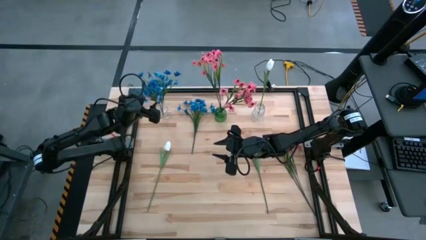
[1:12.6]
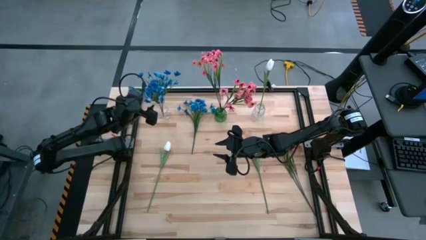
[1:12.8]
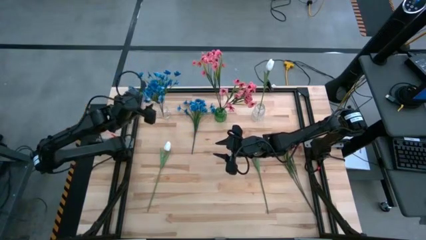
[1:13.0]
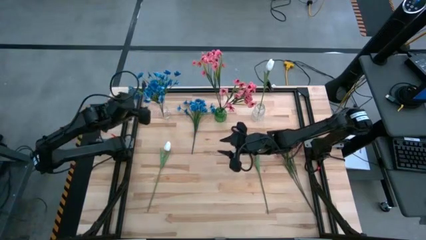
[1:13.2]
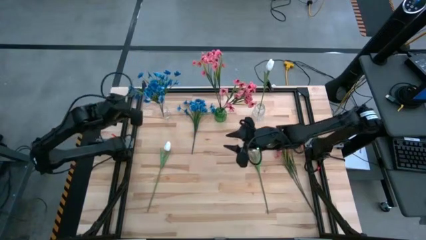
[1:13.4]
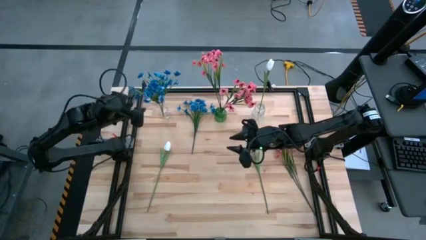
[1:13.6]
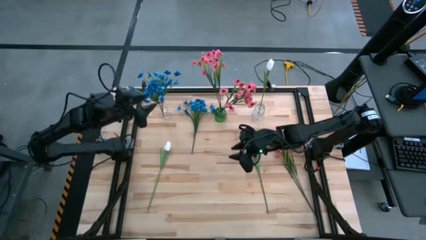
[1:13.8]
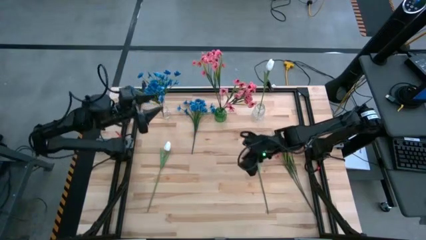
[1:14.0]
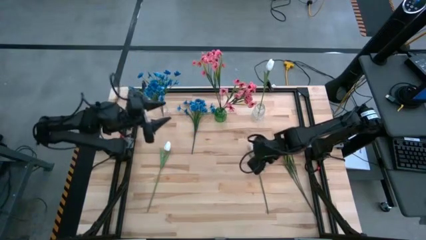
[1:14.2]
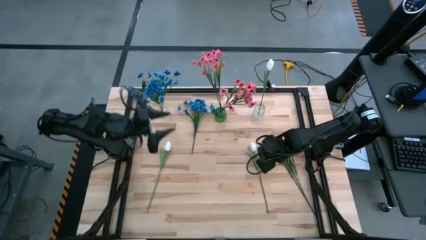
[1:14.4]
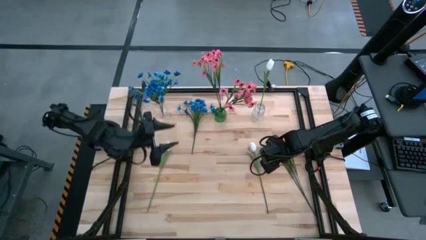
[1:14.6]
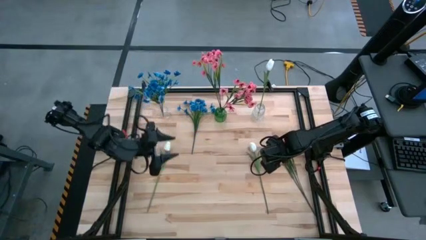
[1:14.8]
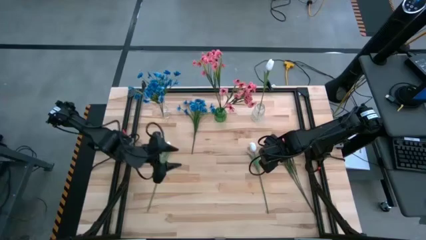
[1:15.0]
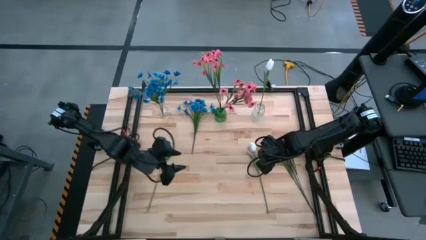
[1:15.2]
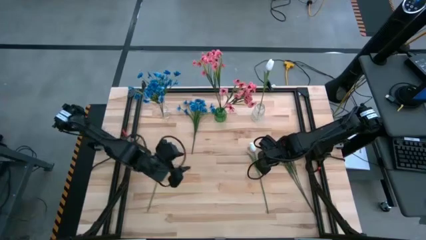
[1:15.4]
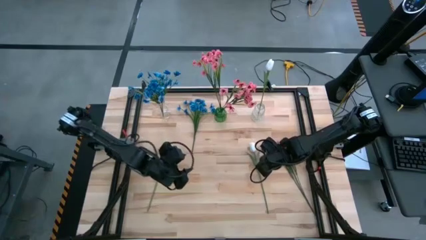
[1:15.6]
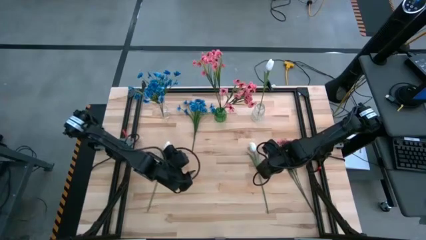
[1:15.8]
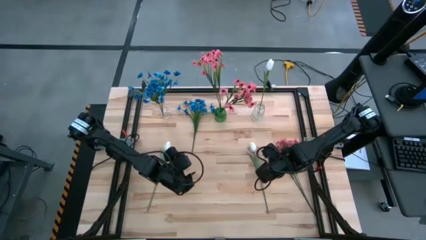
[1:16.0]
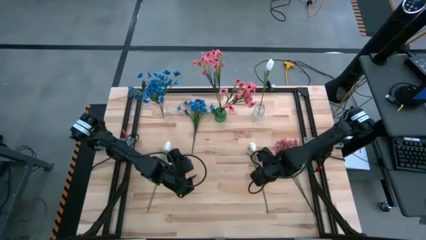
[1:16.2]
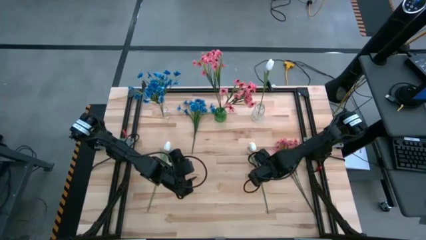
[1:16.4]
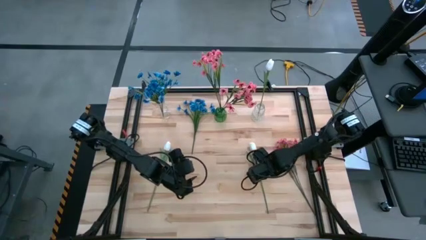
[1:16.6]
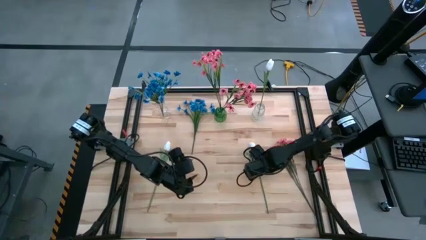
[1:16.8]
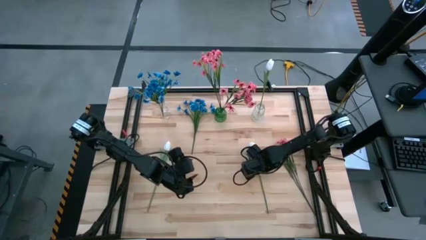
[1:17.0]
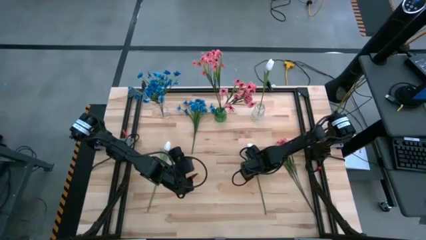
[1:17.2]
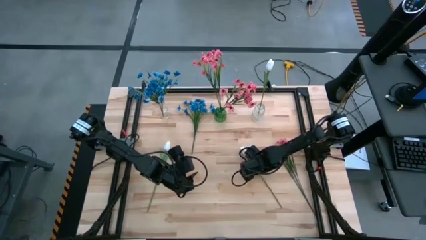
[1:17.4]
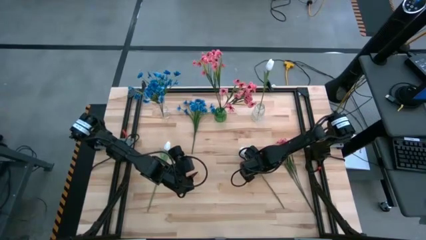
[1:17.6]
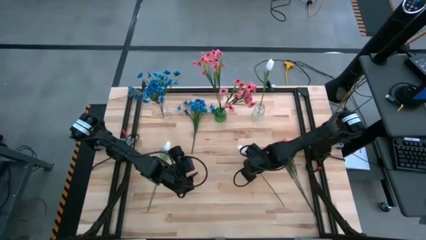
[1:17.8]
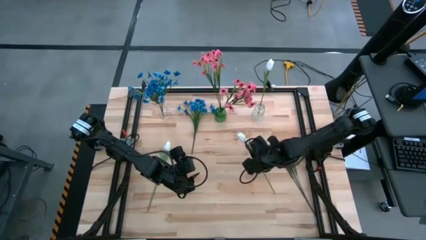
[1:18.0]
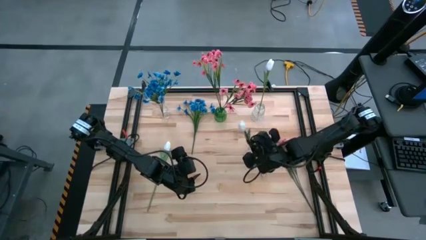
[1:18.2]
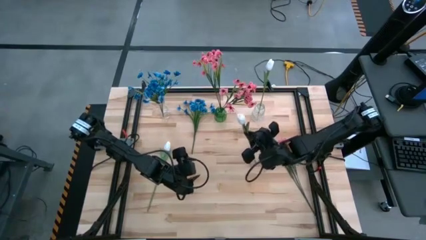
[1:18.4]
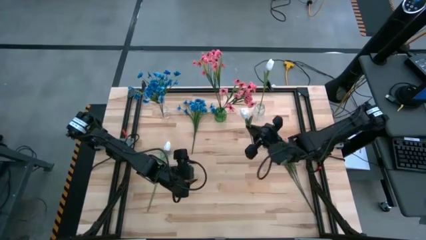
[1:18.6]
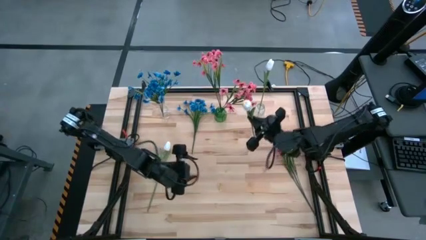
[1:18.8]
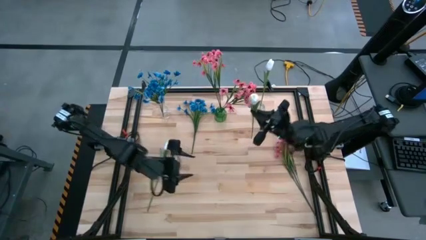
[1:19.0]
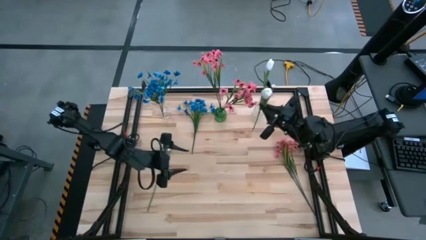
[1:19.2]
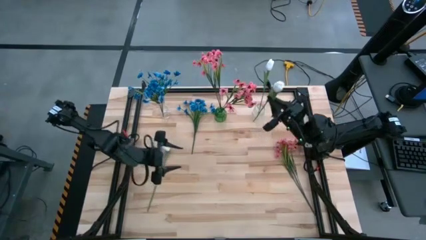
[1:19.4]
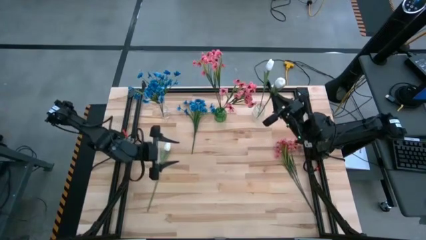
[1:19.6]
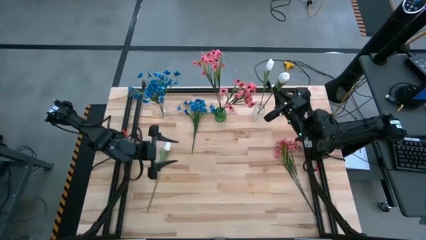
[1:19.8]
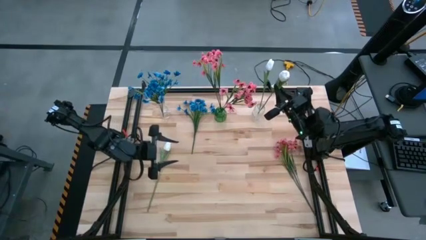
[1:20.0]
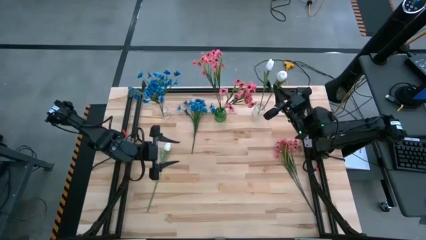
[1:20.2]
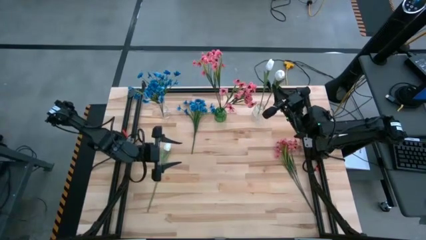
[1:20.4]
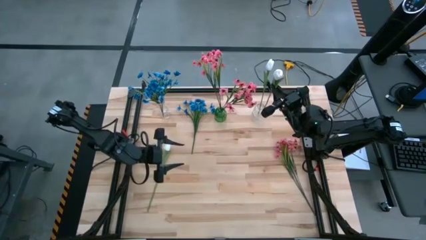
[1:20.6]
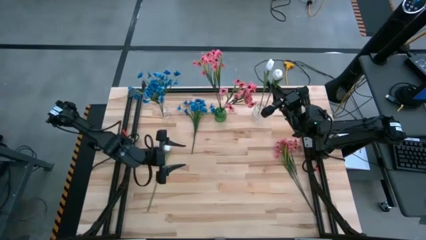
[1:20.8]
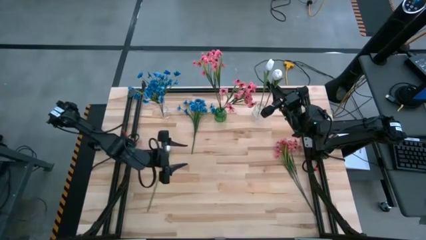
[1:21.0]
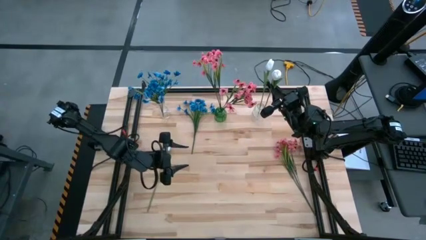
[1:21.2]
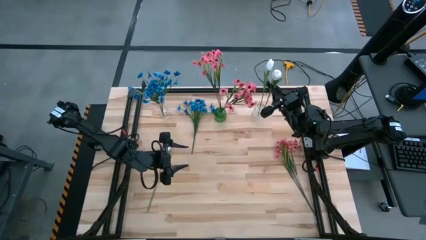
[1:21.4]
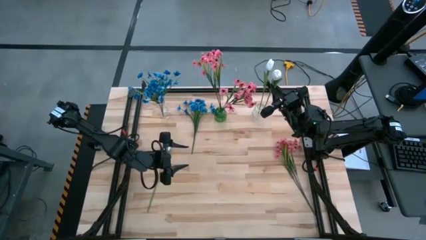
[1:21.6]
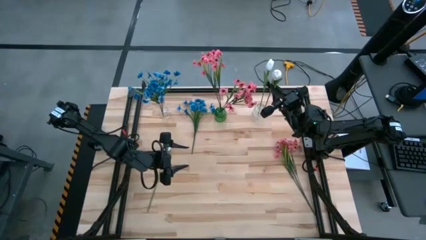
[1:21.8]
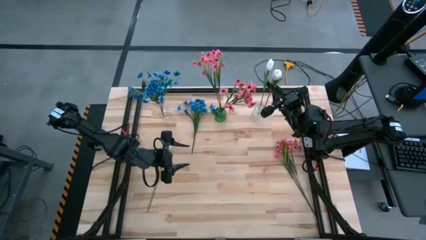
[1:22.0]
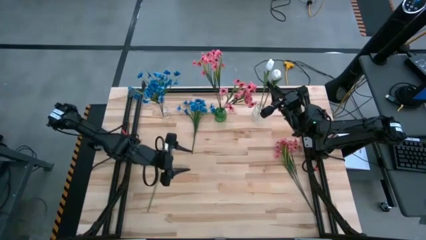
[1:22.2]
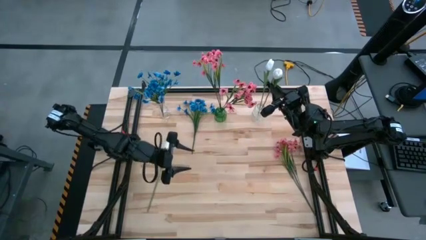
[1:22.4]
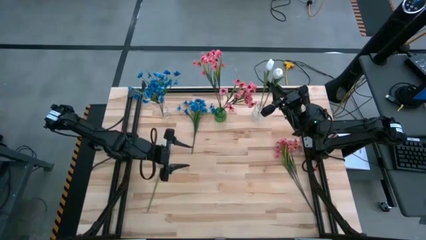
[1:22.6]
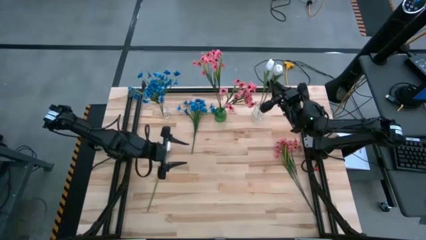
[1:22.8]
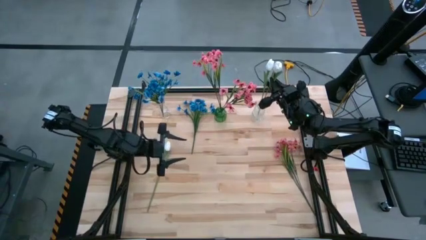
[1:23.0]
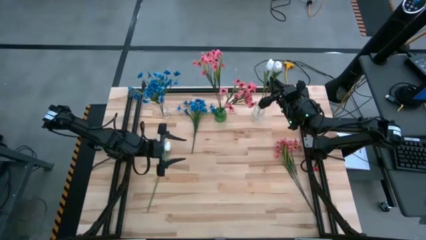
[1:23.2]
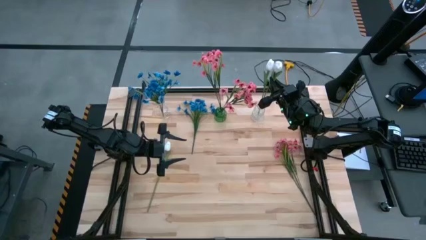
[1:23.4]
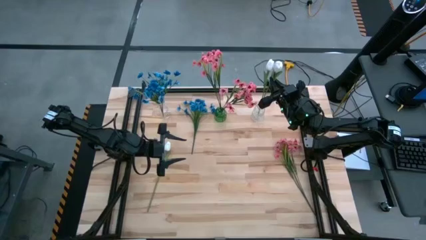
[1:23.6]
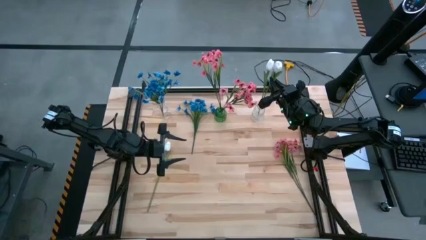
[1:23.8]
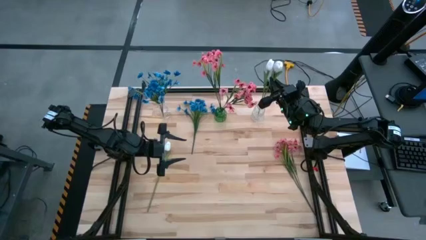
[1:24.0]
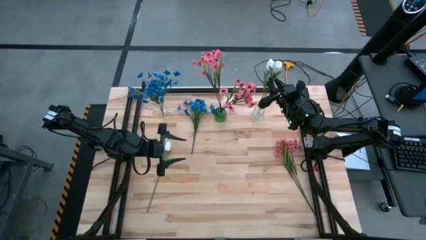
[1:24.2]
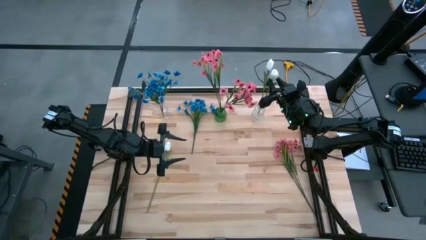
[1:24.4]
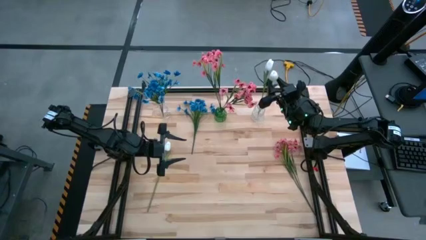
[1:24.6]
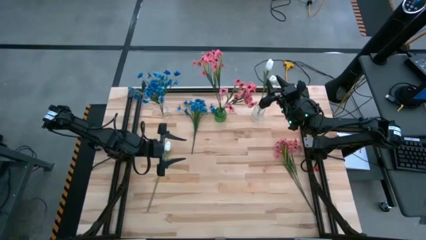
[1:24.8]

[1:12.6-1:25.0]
Task: Sort flowers into vase by color
Put the right white flower into the right transparent vase
